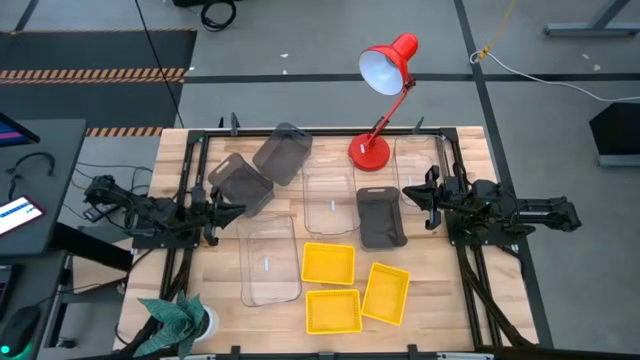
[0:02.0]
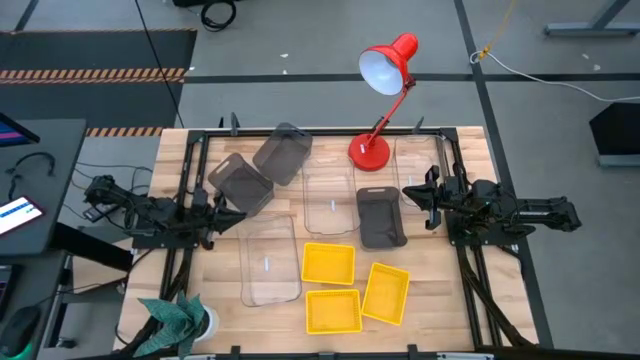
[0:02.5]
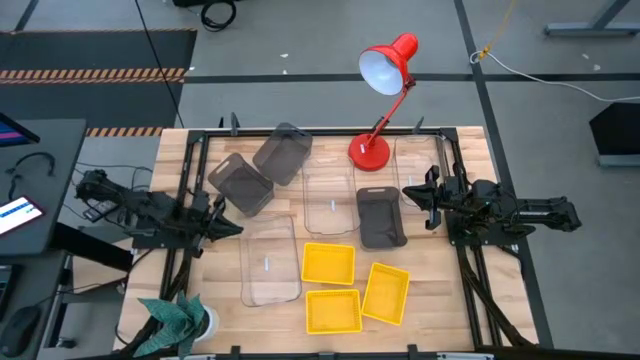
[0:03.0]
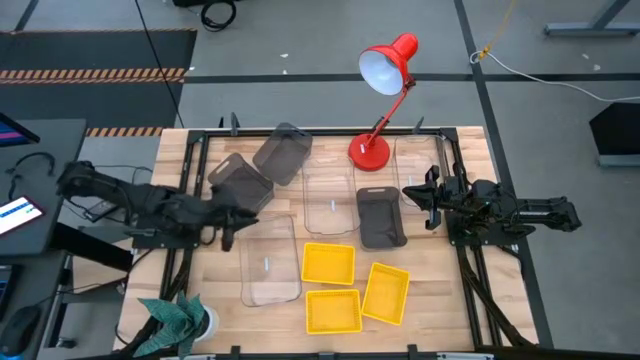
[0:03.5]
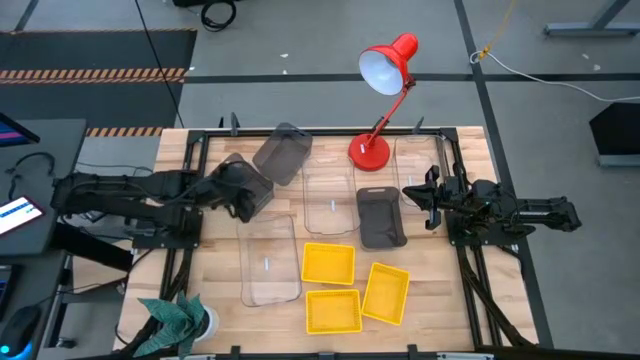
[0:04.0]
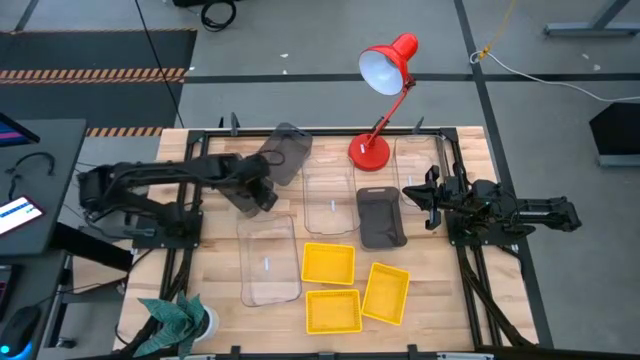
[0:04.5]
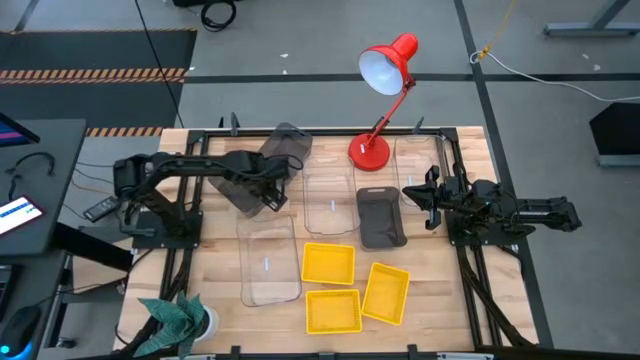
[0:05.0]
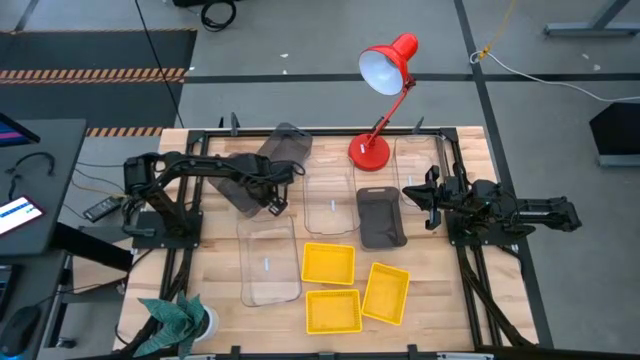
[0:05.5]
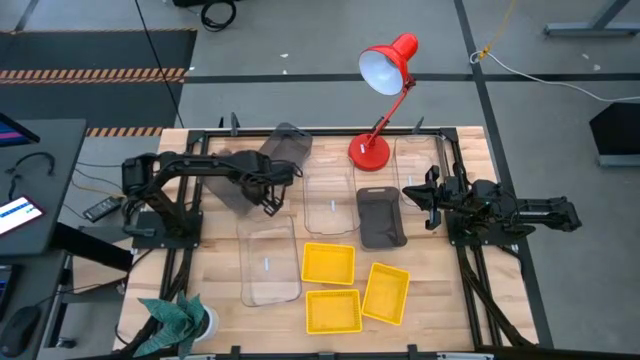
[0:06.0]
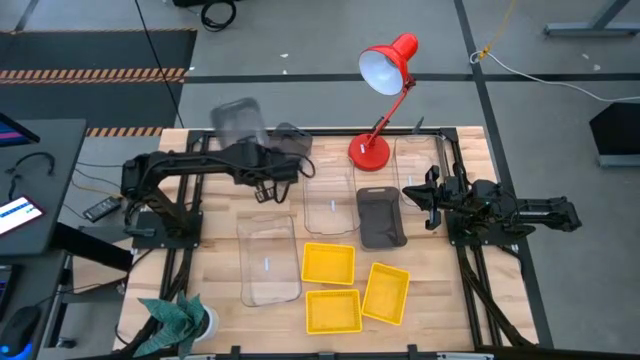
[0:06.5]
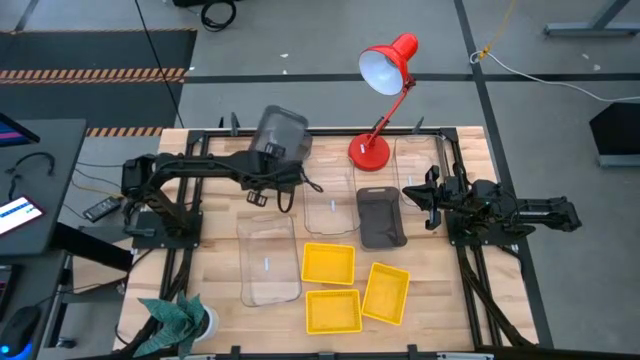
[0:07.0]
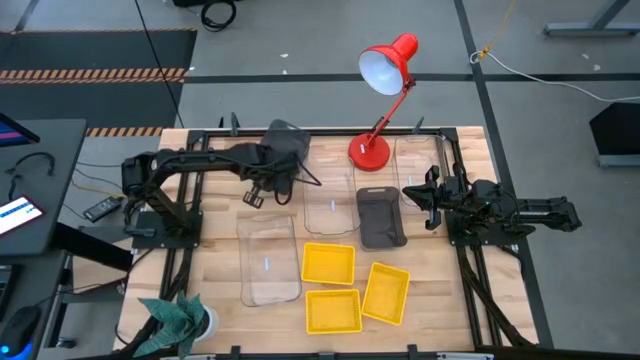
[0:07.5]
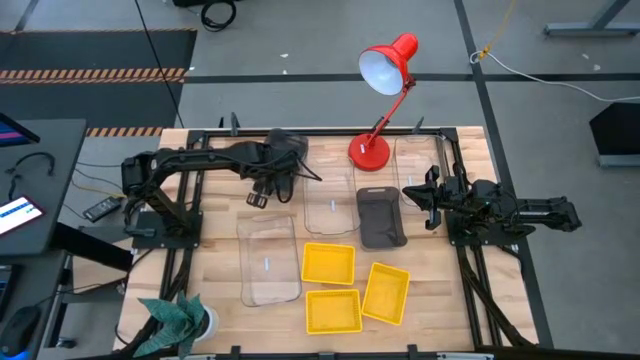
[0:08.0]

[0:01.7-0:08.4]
Stack the left black bin on the top black bin

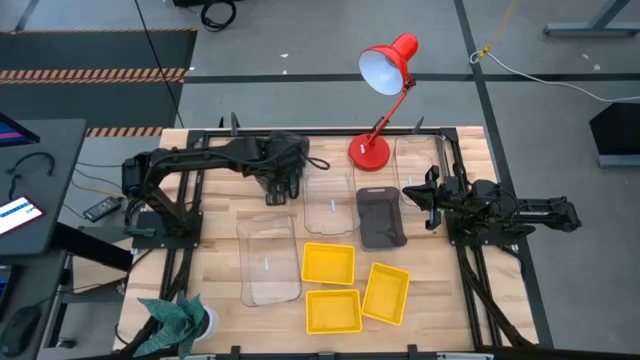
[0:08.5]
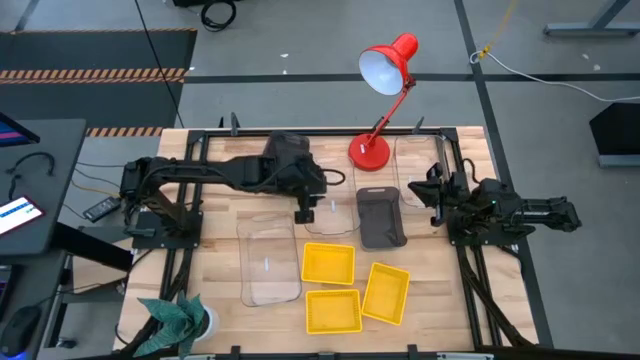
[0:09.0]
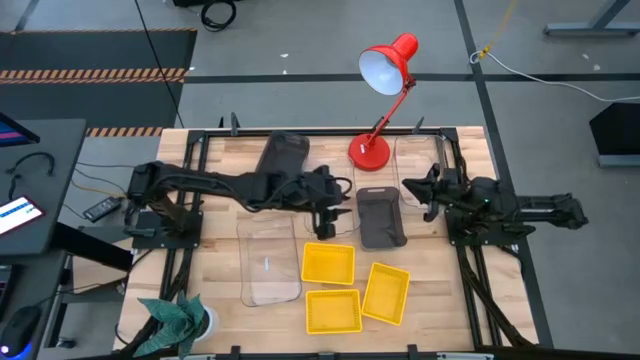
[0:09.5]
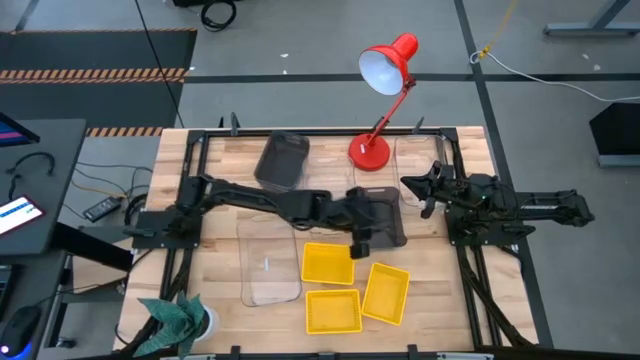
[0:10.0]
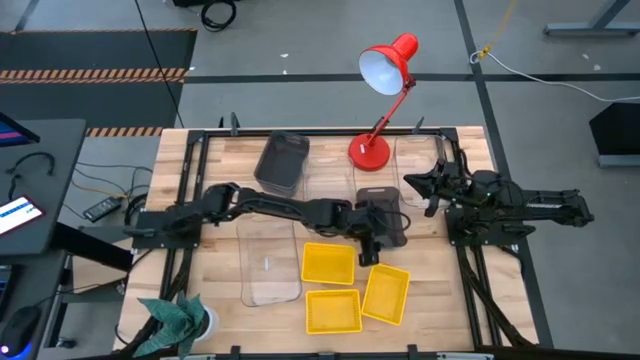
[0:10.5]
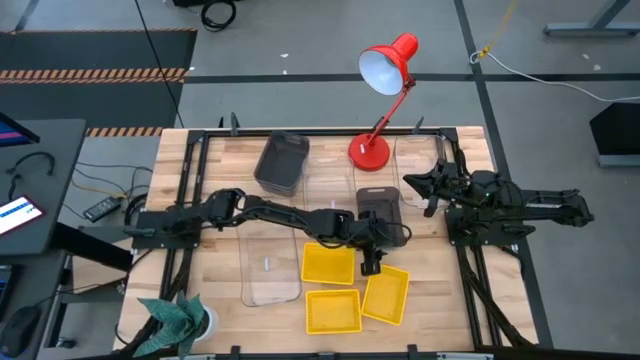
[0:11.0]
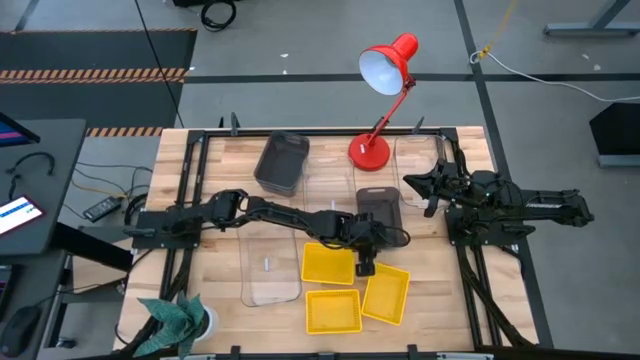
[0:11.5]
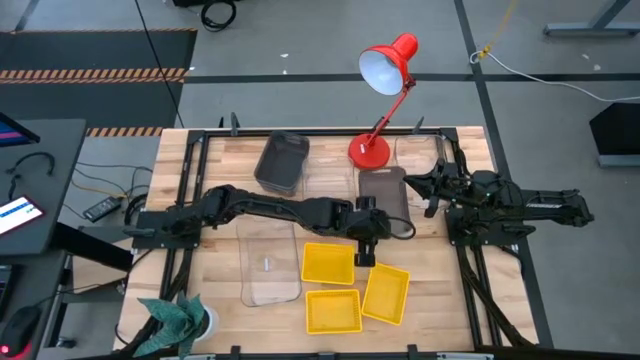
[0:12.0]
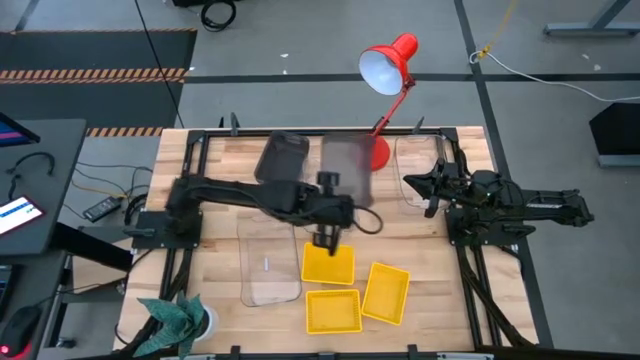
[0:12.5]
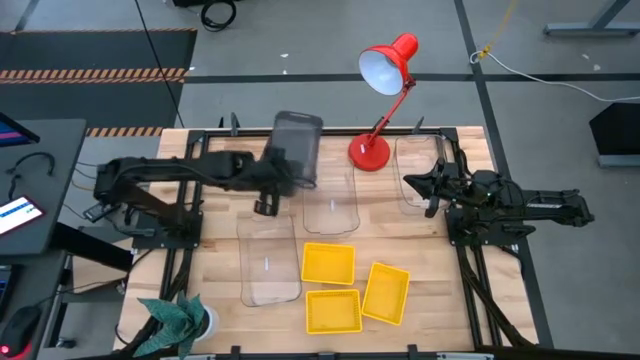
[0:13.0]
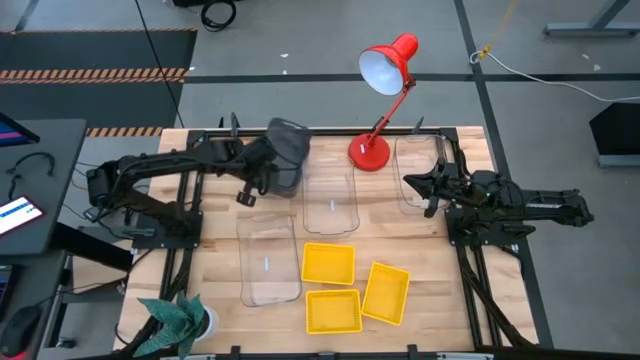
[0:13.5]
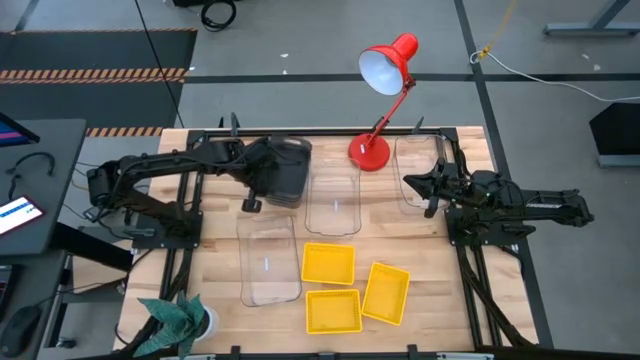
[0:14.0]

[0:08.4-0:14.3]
Stack the bottom black bin on the black bin

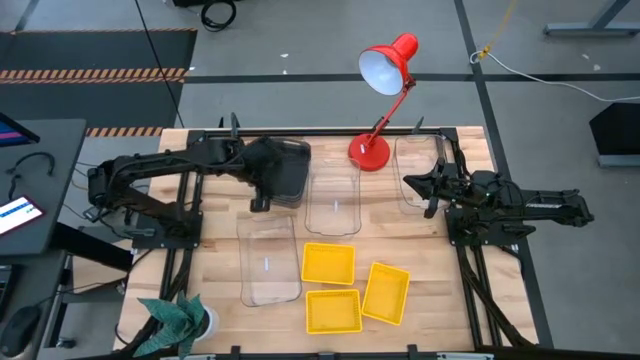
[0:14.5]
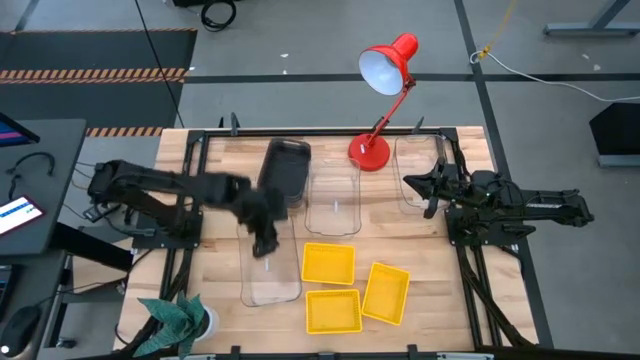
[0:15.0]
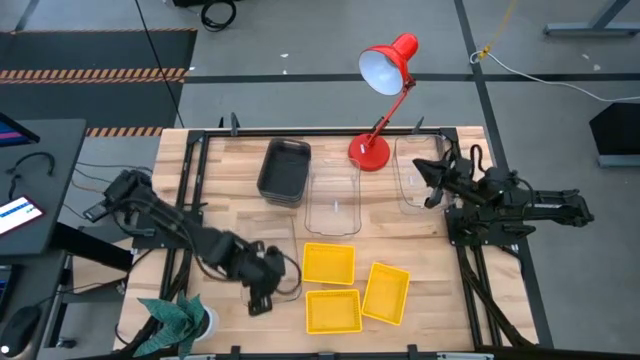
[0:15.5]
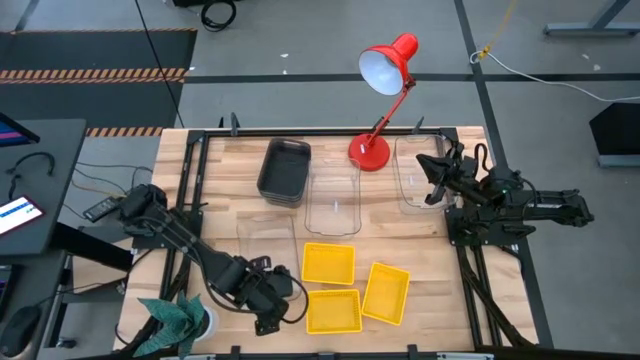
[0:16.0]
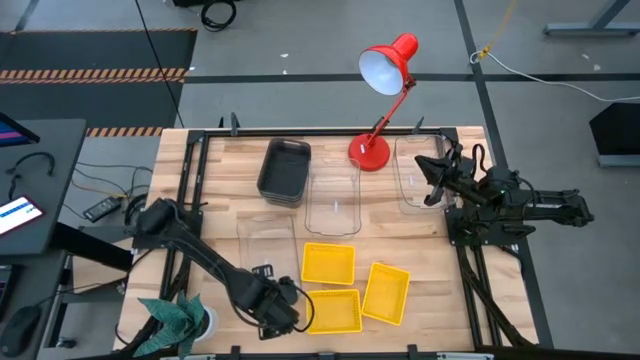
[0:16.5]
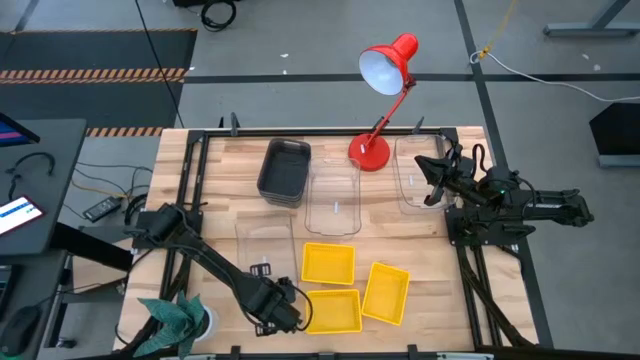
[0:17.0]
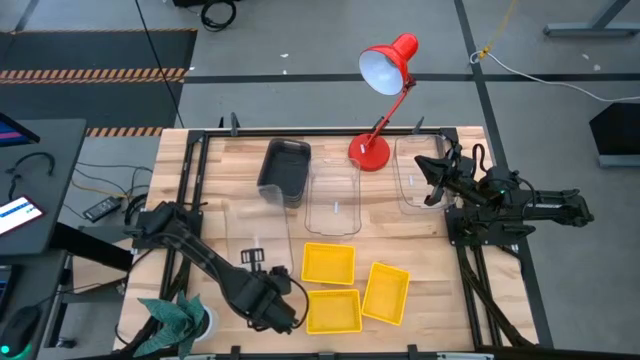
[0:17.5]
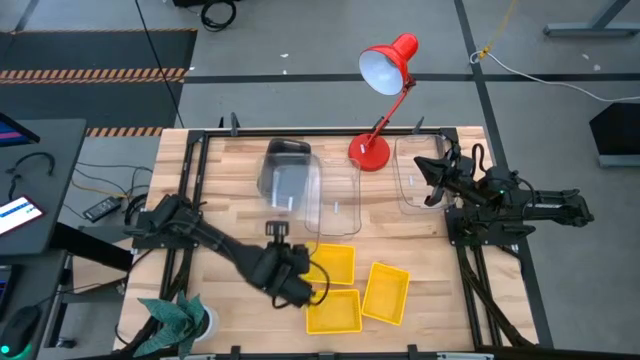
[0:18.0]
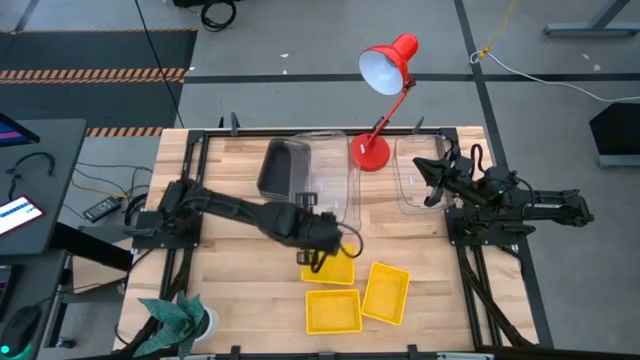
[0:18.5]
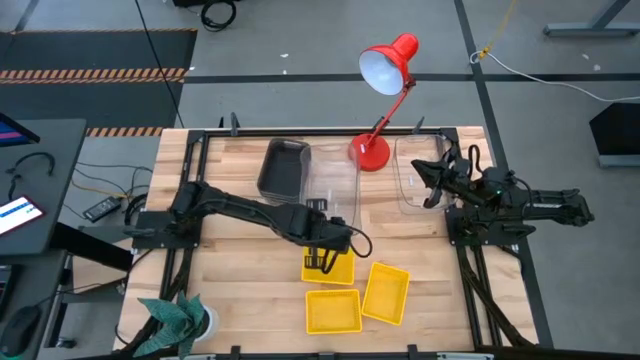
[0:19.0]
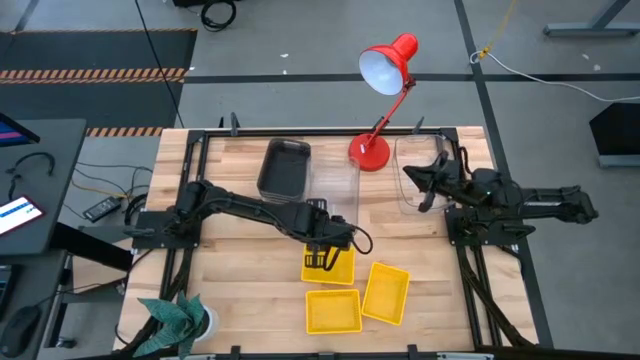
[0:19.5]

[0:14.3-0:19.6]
Stack the bottom transparent bin on the middle transparent bin
